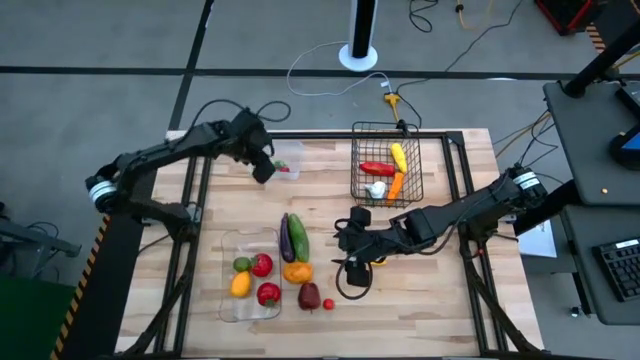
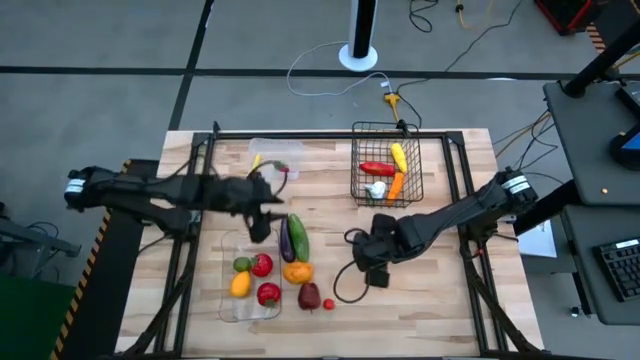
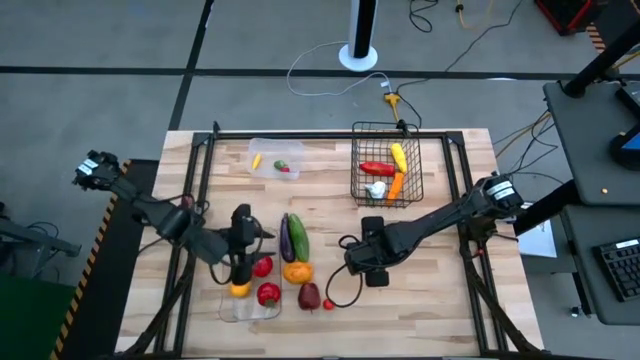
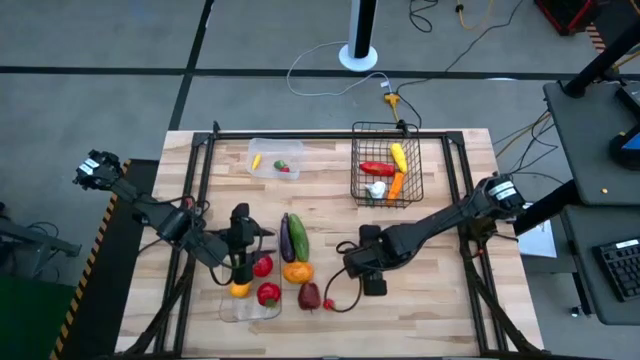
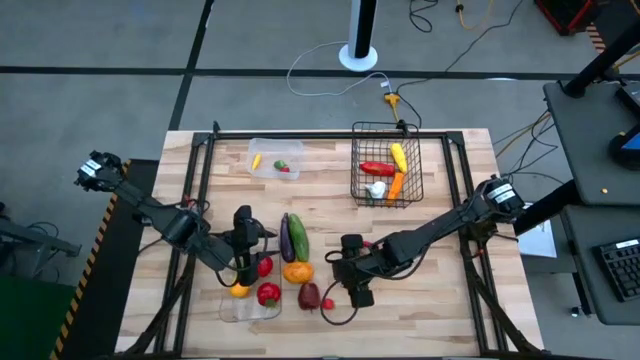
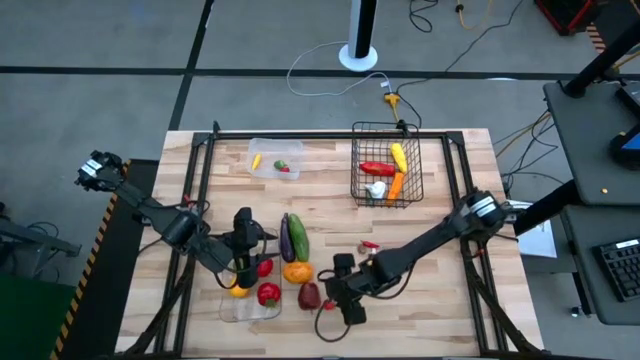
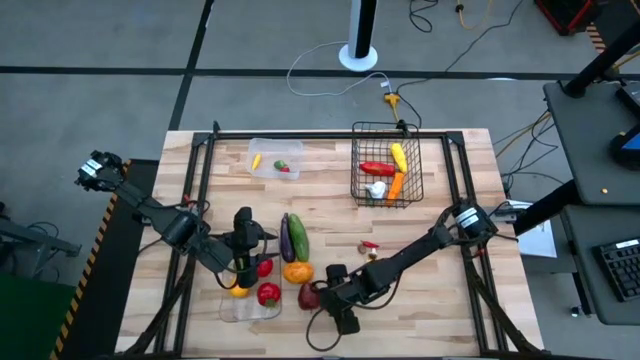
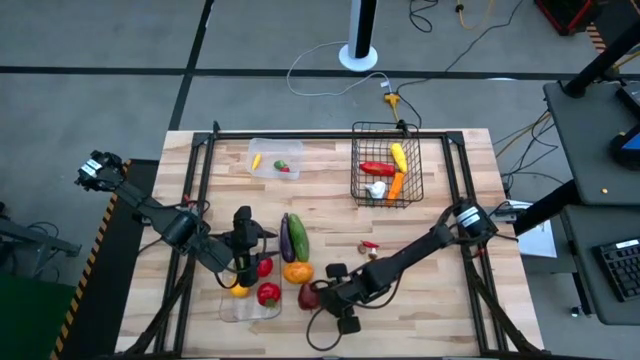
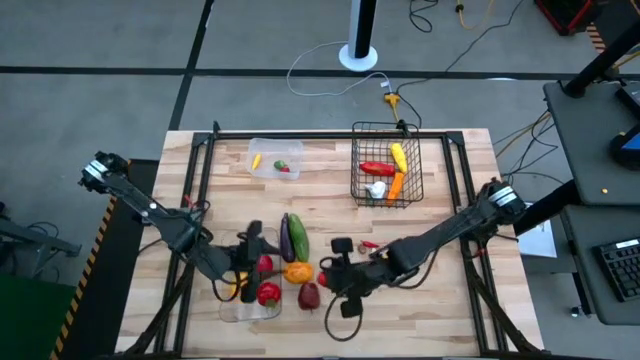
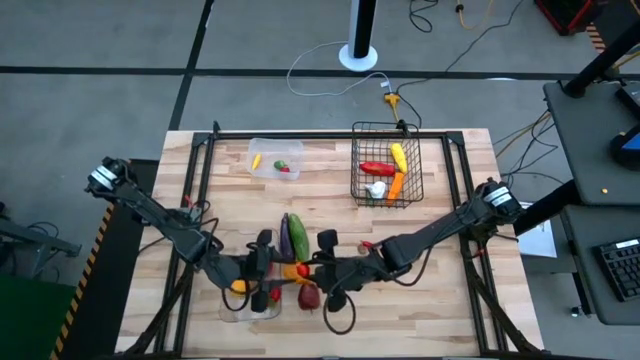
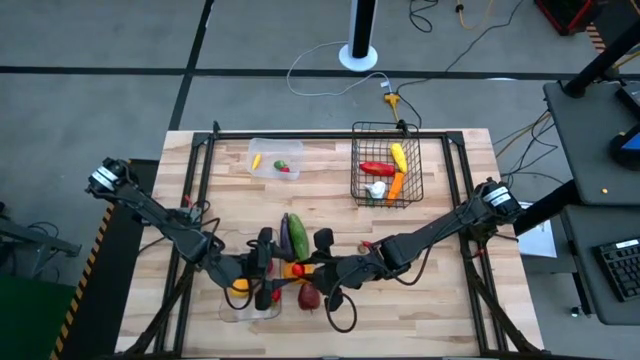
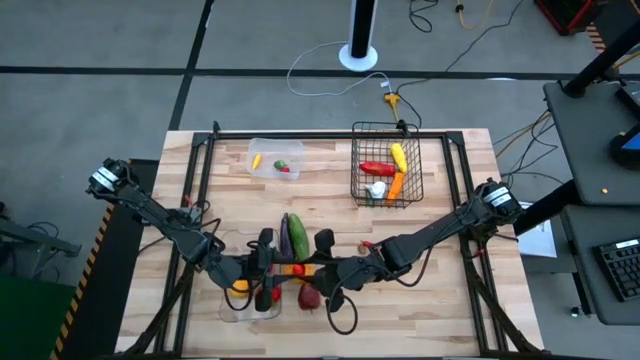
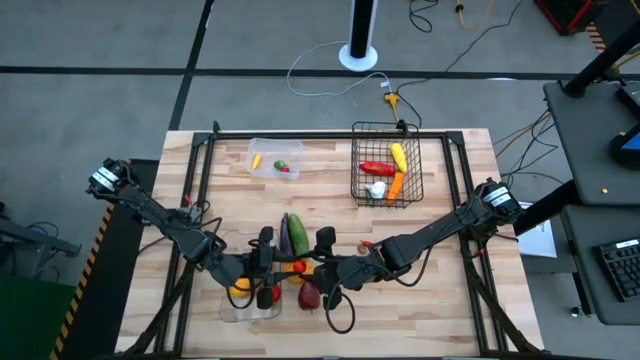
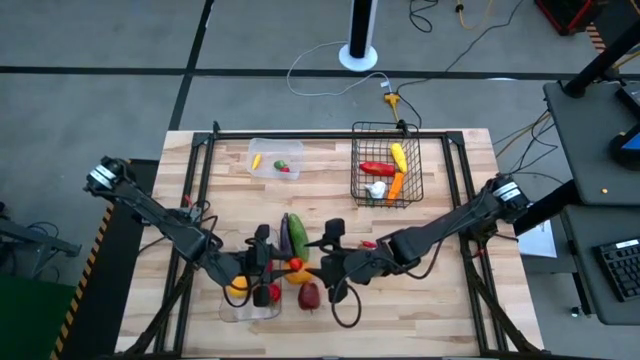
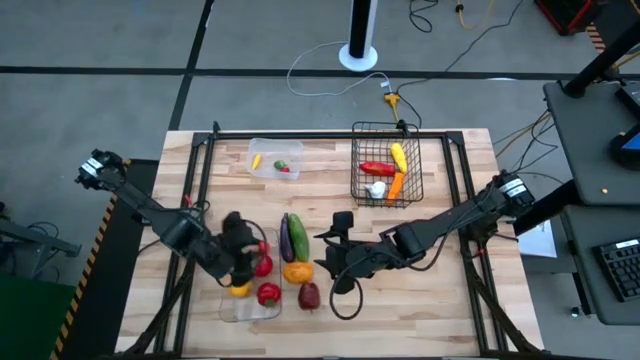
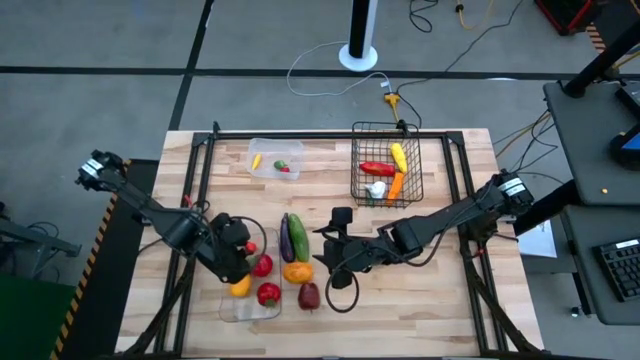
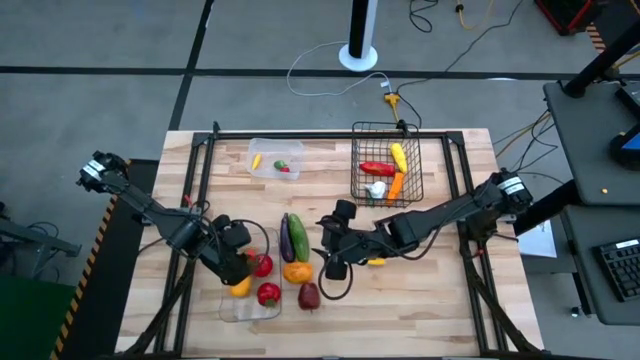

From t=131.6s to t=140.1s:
Task: Sort produce into baskets
Put the small red tomato into the transparent bin

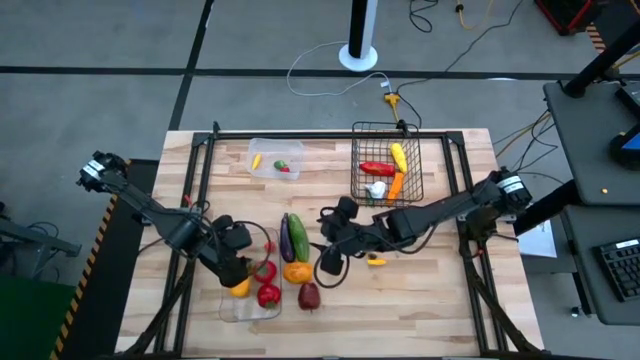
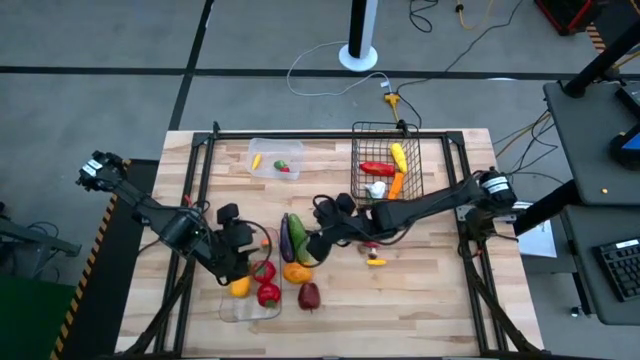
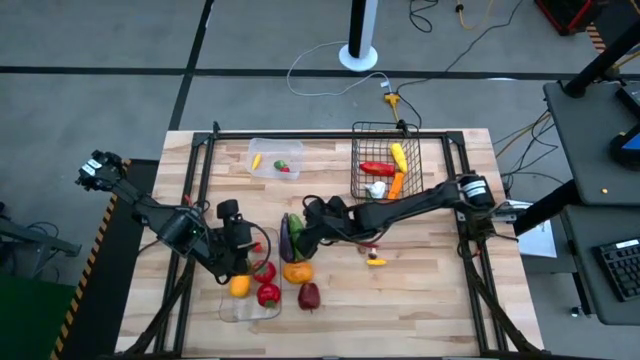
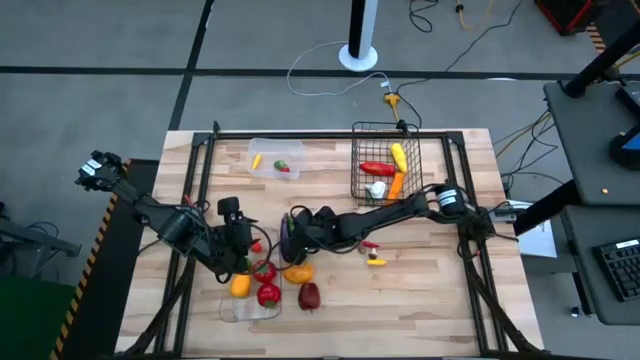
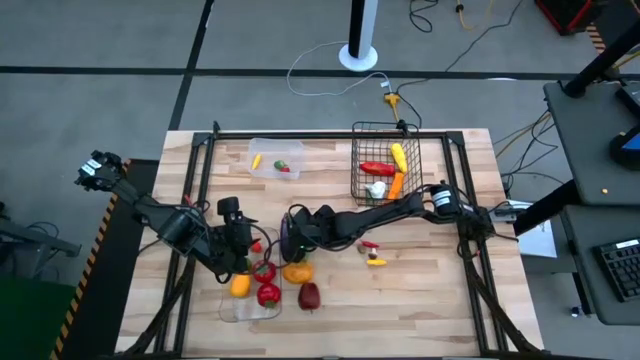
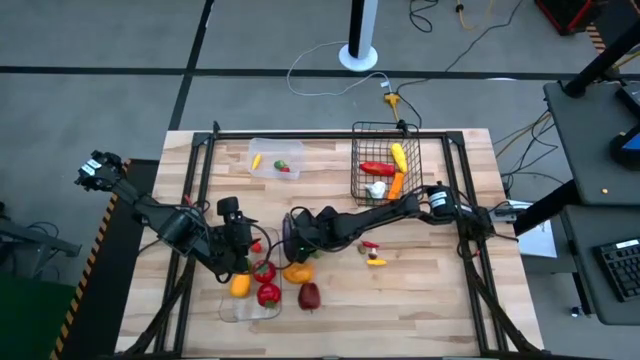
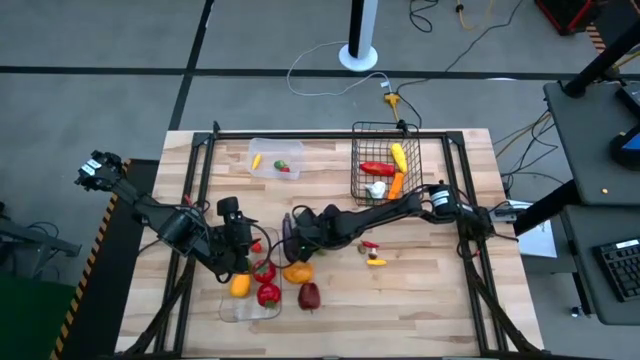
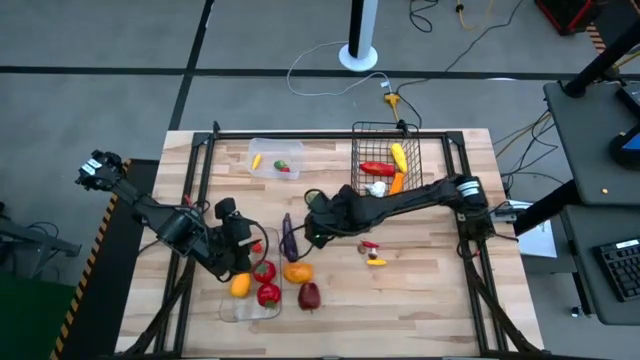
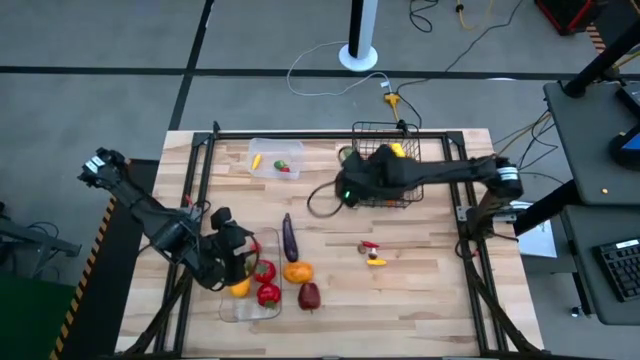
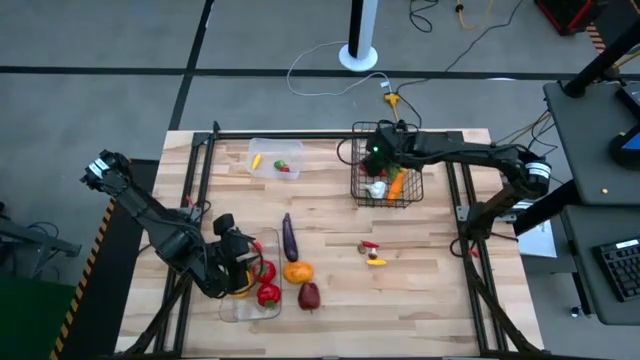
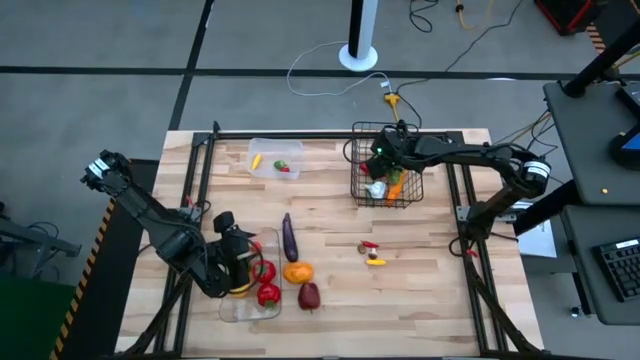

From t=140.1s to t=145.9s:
Put the cucumber into the wire basket

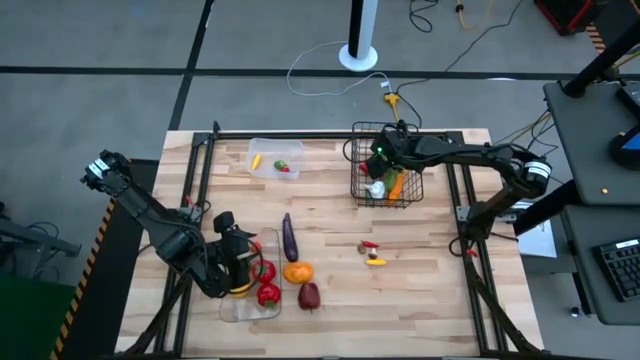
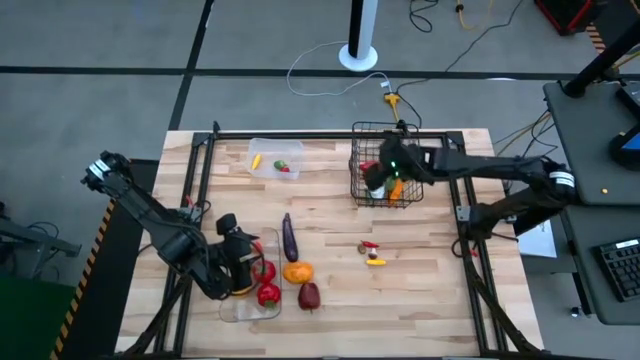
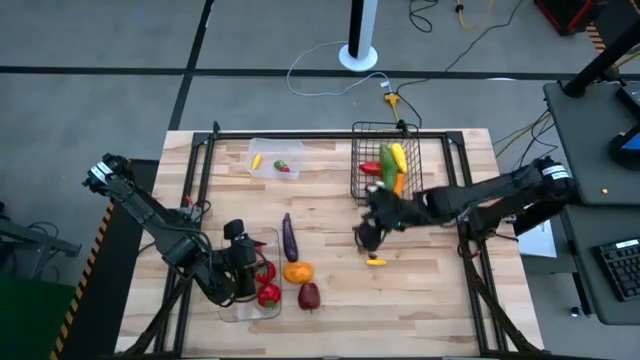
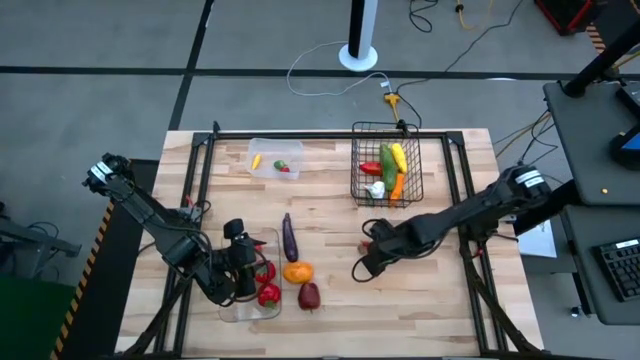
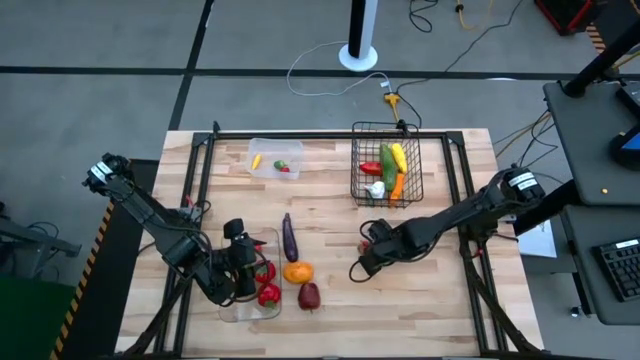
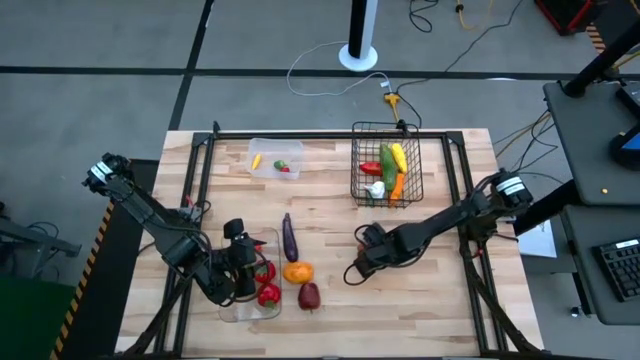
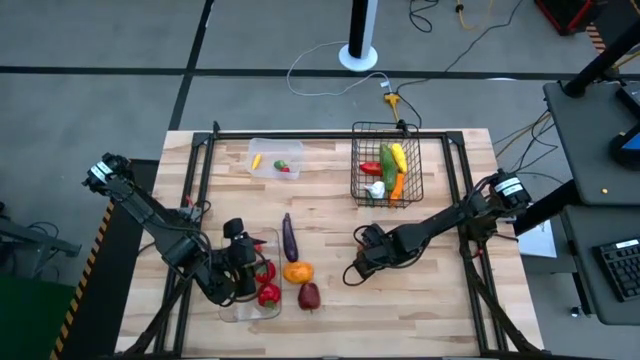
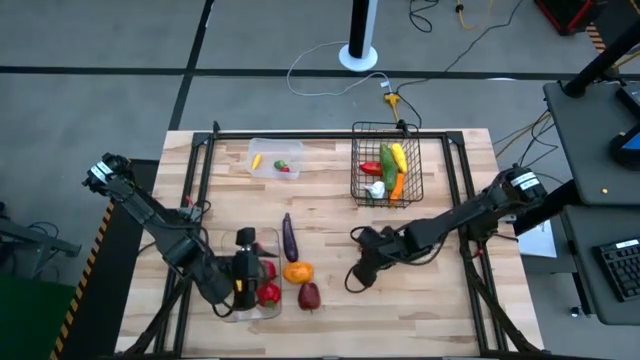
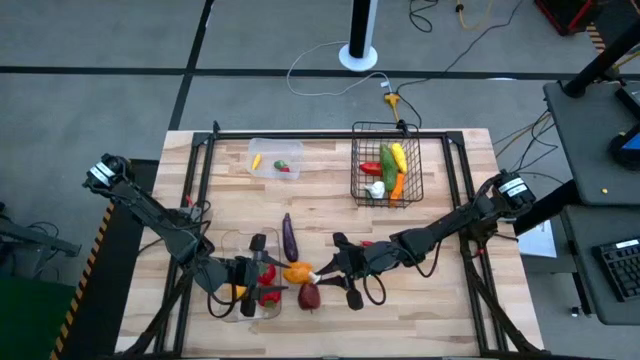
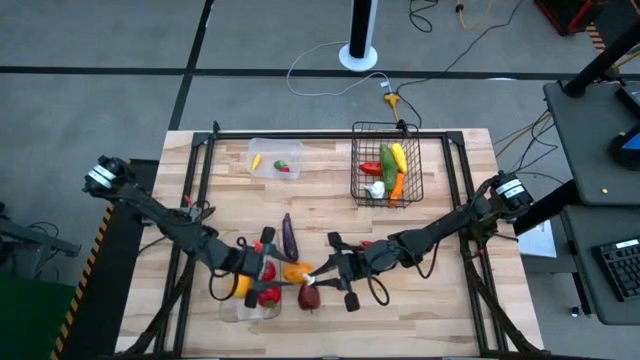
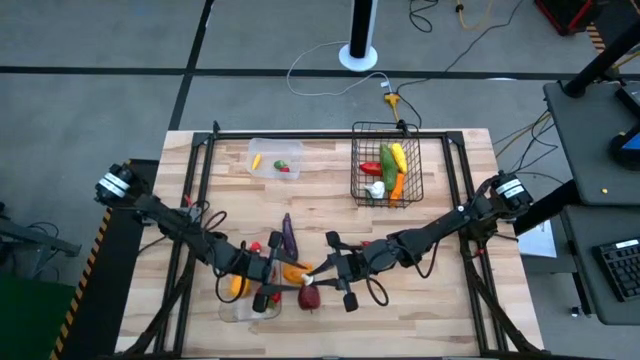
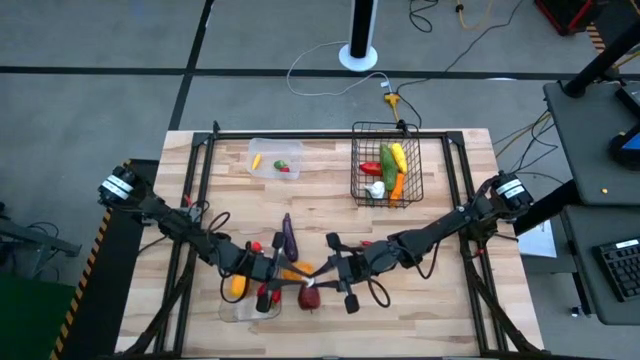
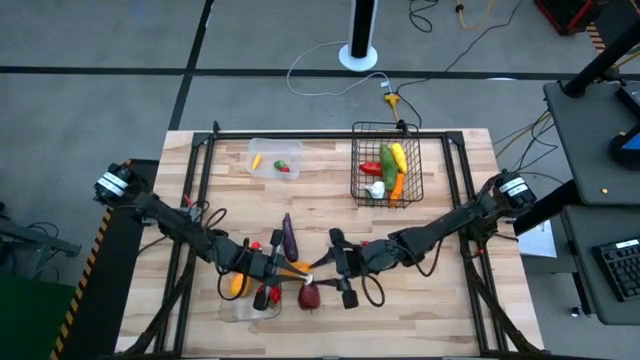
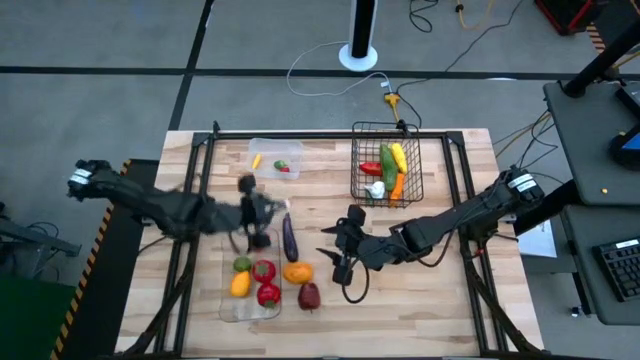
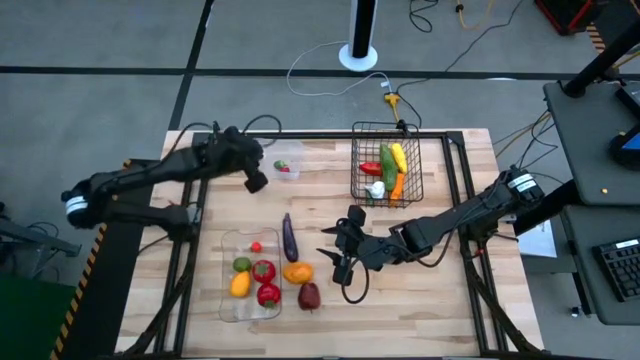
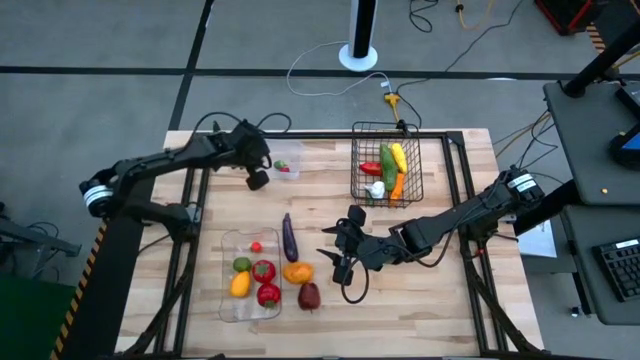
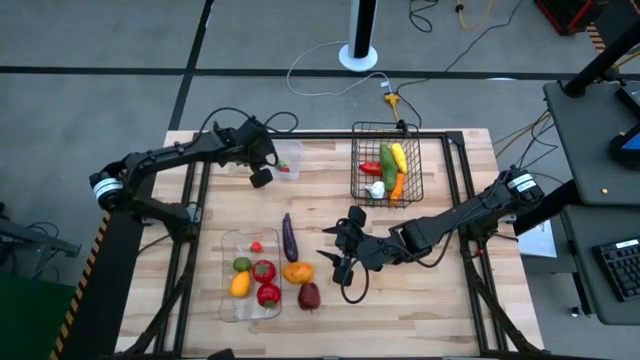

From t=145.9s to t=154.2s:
Put the mushroom into the white bin
